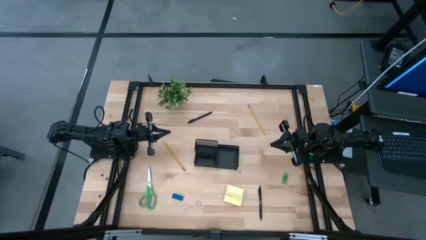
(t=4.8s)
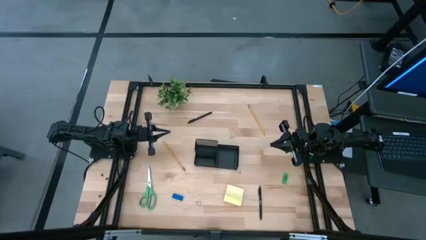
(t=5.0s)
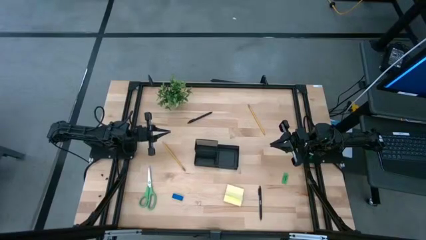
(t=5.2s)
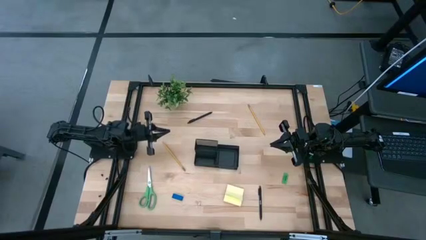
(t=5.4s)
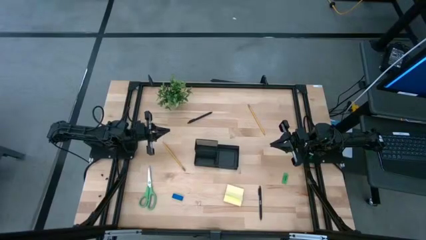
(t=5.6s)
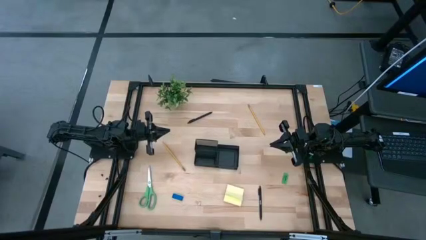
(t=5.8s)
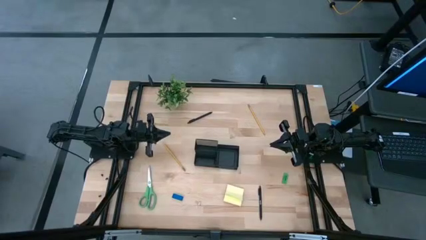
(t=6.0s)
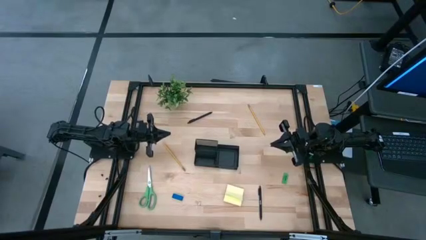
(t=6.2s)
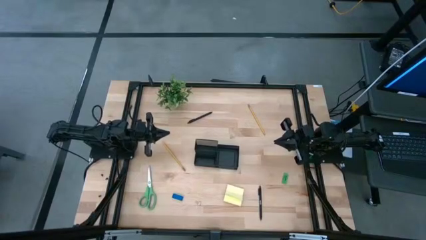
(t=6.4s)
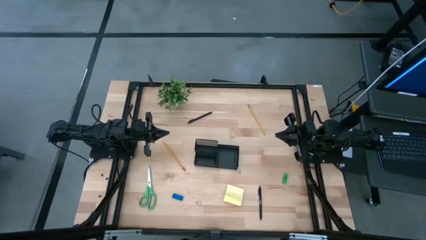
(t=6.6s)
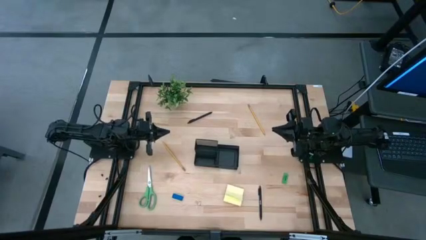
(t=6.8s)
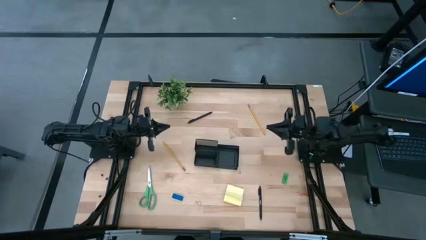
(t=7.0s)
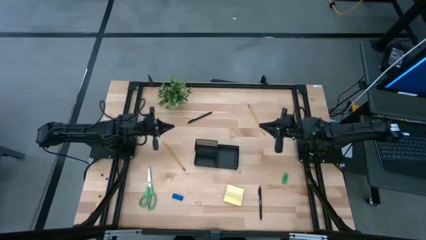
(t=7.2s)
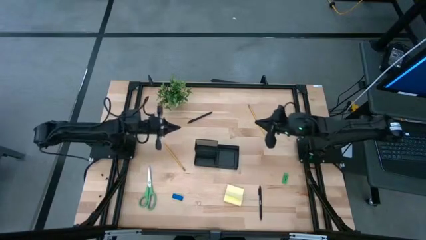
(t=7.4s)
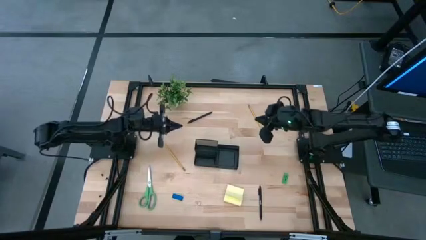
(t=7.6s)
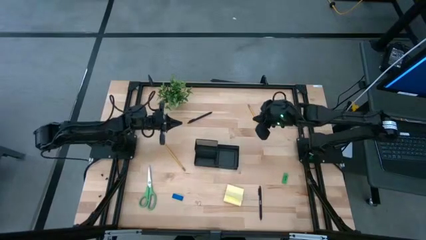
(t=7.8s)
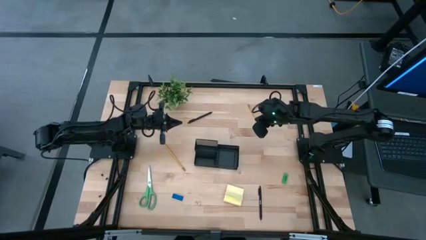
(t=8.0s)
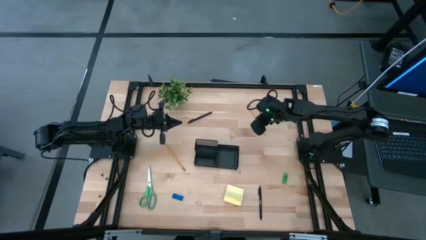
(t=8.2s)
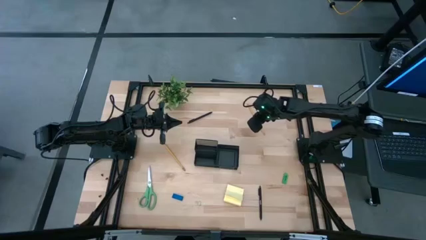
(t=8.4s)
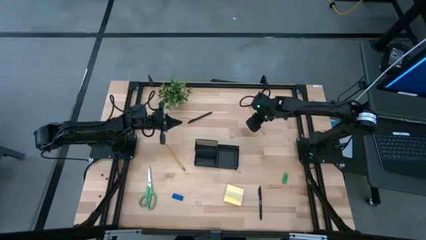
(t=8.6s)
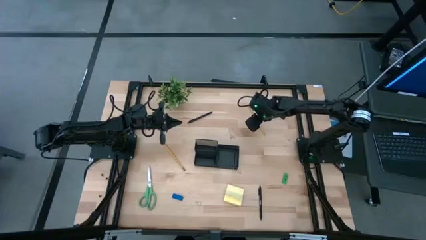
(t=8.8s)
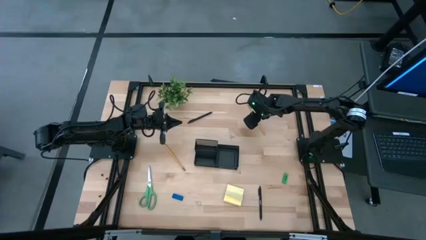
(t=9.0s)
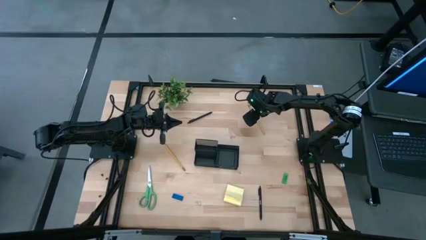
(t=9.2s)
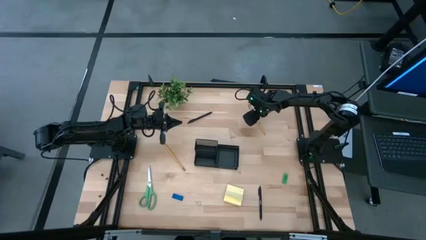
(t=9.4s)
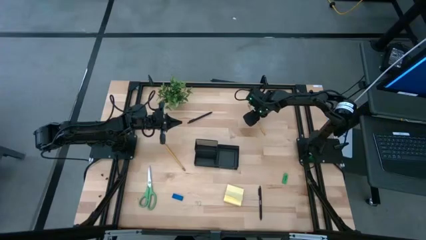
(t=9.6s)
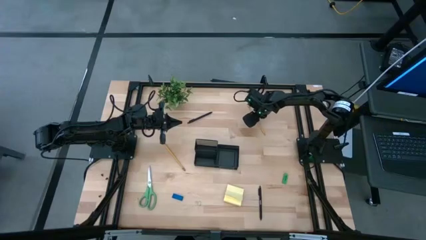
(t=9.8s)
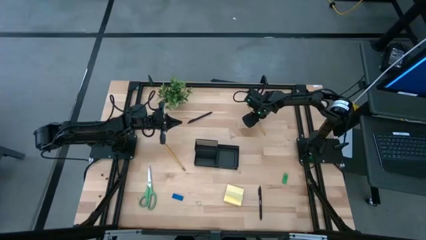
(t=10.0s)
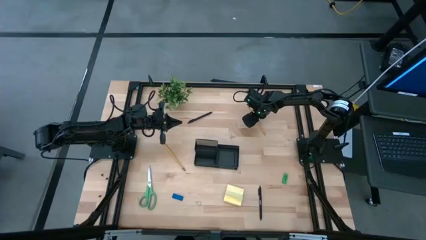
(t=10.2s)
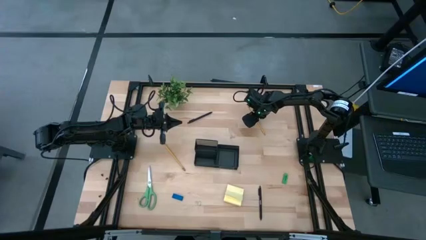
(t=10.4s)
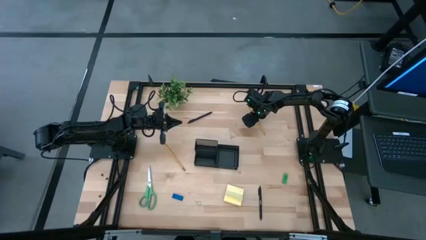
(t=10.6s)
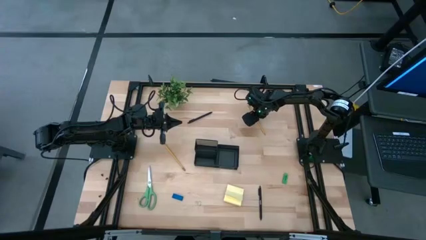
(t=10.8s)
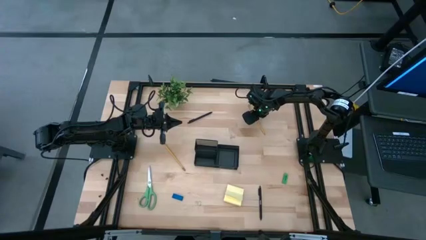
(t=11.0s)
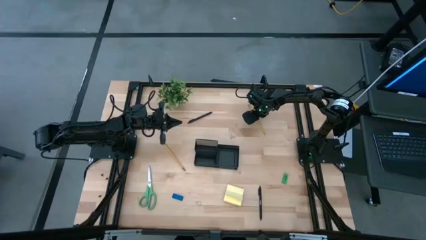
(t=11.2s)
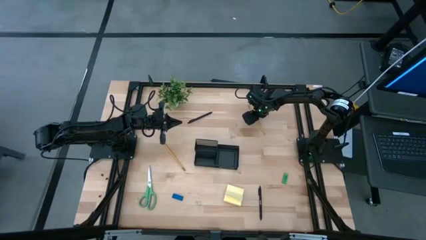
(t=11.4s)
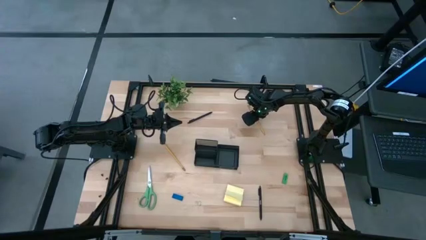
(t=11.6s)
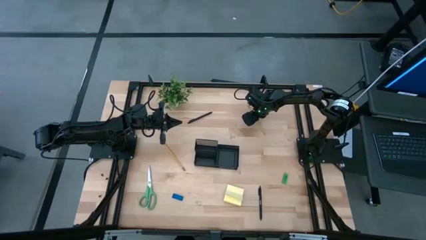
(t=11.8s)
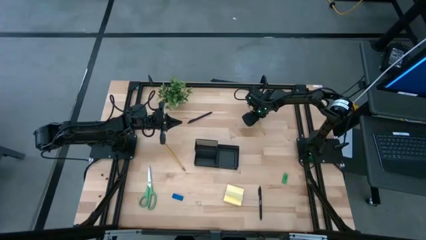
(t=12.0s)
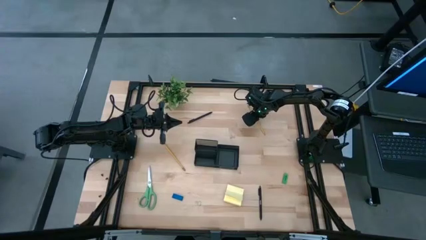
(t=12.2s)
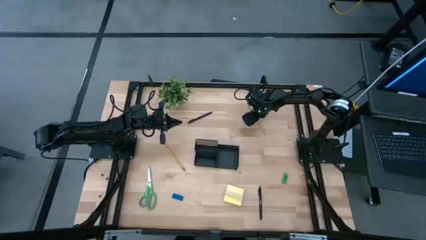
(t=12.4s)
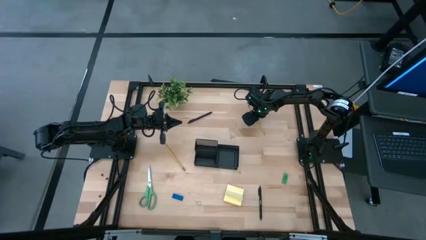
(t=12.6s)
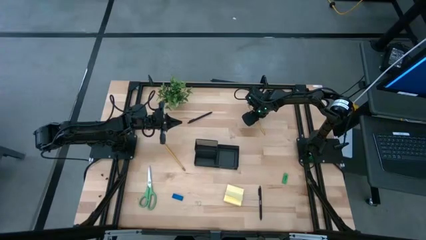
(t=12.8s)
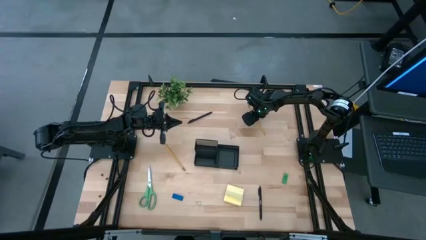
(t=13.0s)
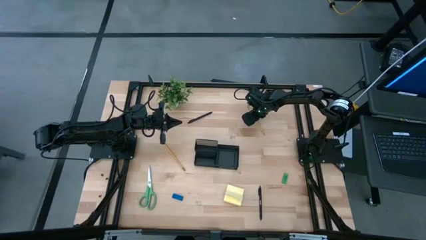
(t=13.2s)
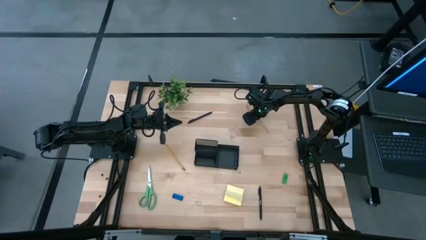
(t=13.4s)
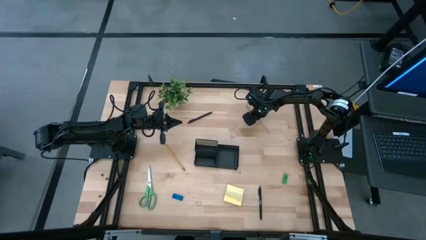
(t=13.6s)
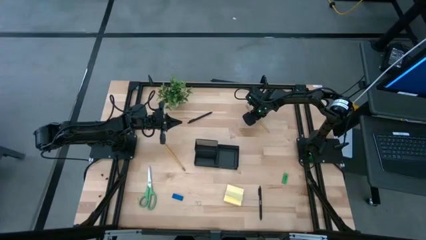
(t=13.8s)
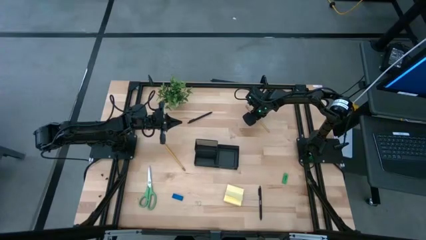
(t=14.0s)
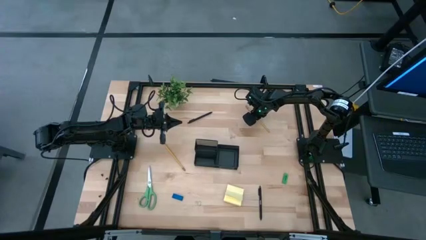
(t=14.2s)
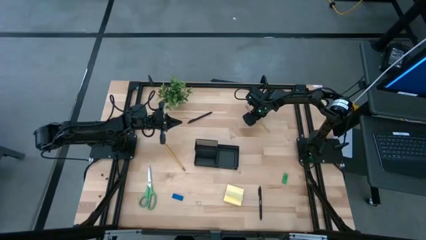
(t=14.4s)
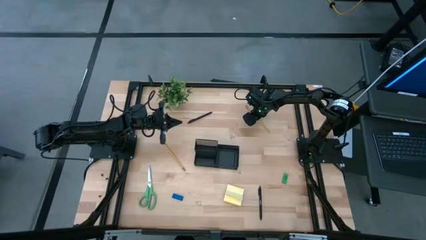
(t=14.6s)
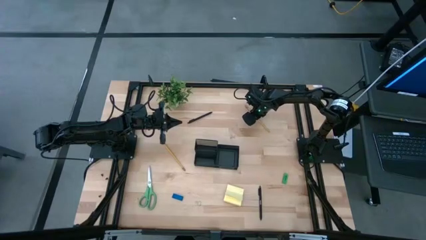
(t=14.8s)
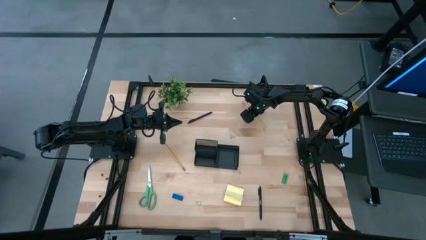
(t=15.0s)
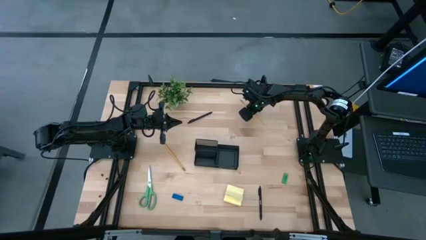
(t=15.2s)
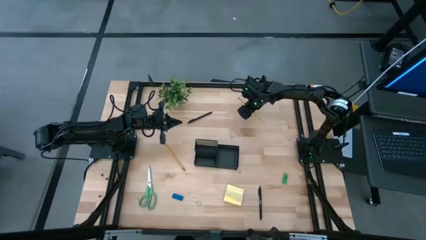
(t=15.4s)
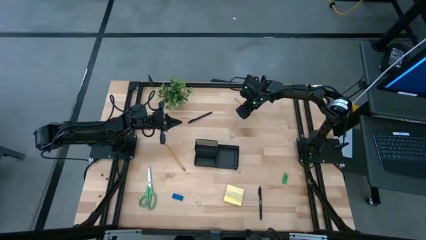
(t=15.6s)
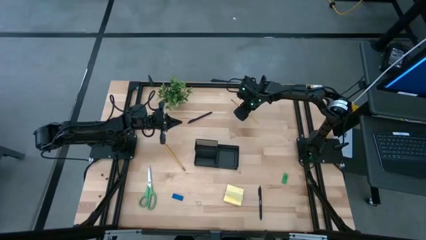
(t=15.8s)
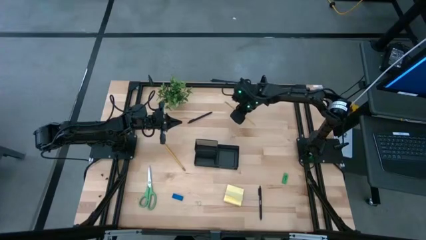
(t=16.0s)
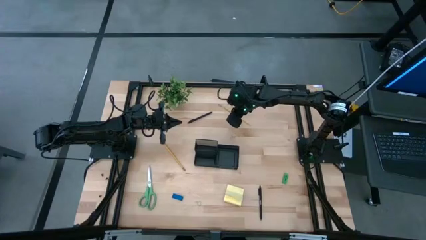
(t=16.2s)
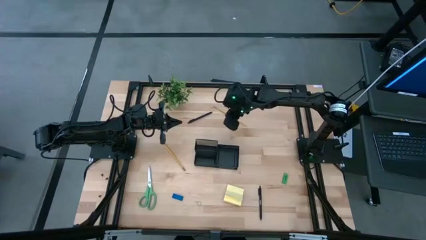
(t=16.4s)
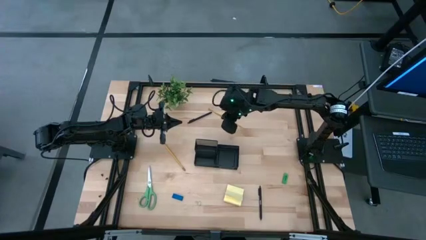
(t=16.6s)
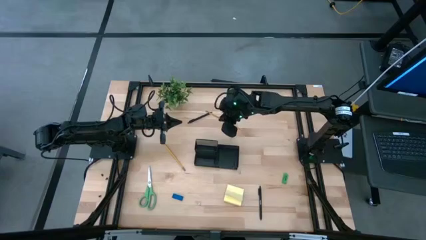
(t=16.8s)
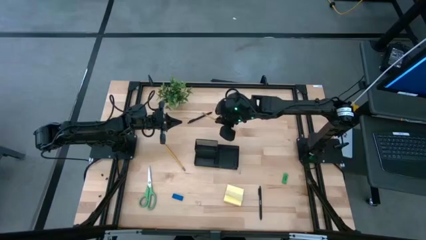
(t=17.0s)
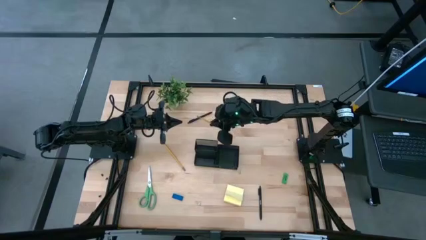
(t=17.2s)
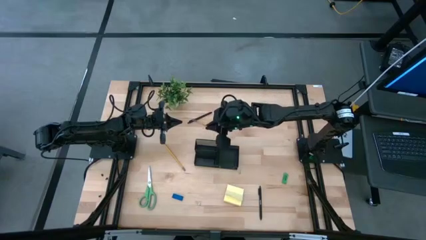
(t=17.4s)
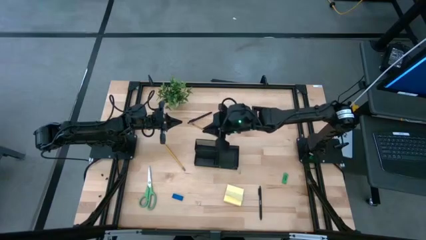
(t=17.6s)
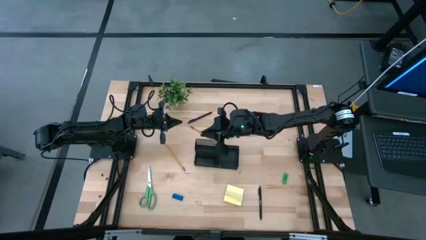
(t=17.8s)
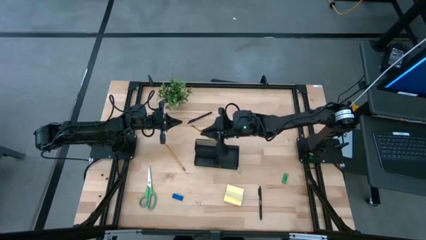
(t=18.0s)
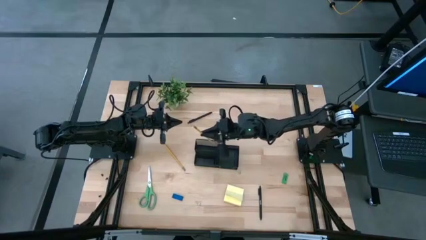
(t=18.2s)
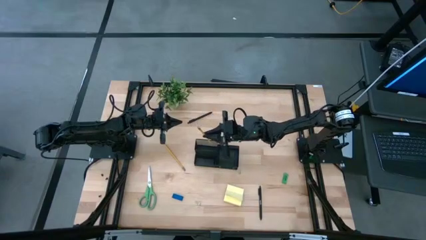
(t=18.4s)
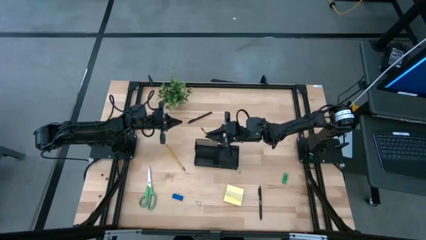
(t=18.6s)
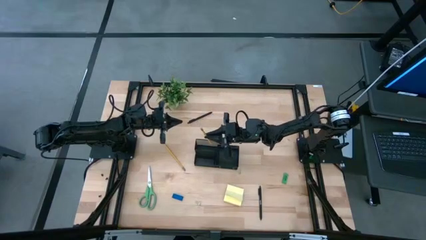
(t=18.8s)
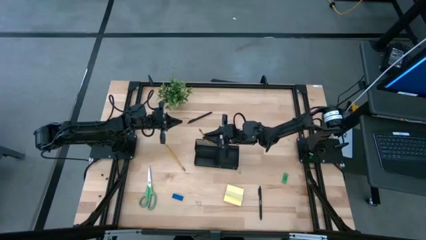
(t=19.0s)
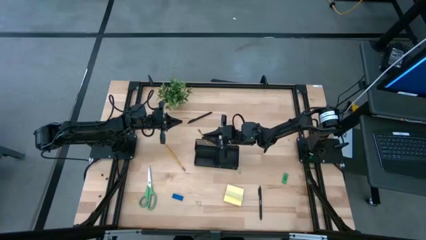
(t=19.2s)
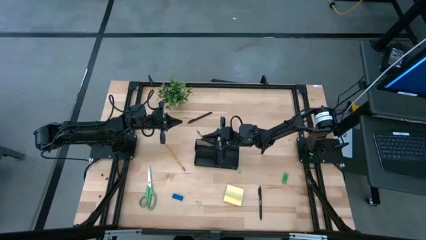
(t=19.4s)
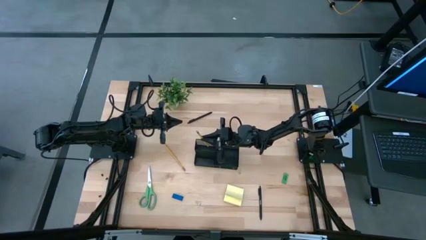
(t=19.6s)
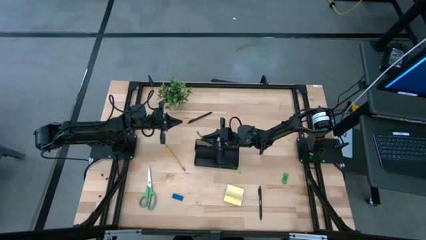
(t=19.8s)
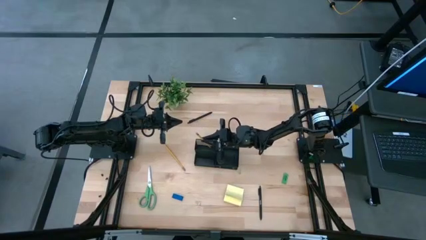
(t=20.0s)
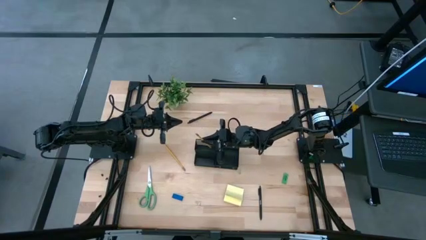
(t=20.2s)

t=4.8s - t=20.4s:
Task: Pick and place office supplies into organizer
Put the top yellow pencil into the black desk organizer
